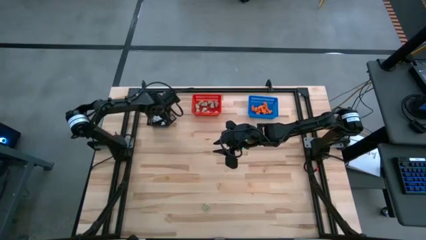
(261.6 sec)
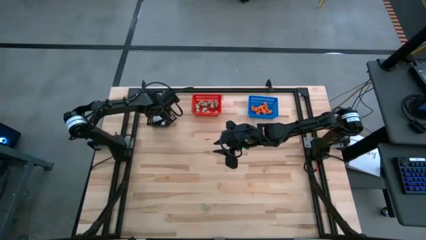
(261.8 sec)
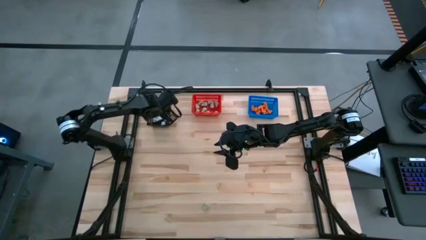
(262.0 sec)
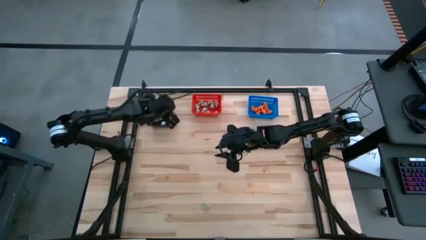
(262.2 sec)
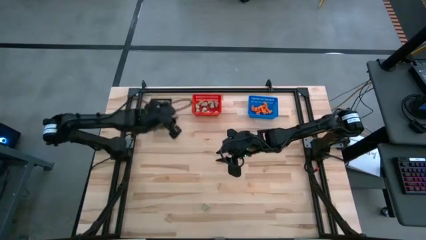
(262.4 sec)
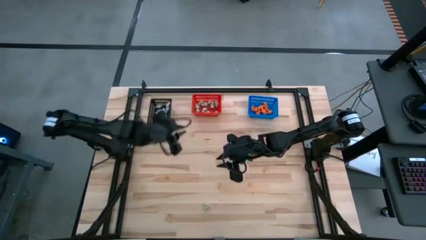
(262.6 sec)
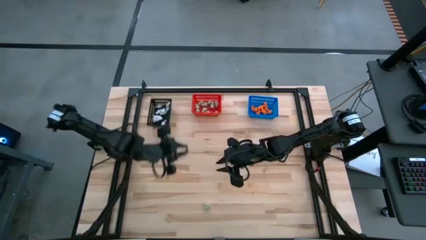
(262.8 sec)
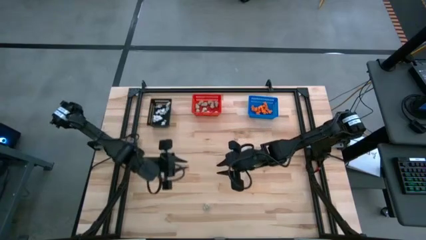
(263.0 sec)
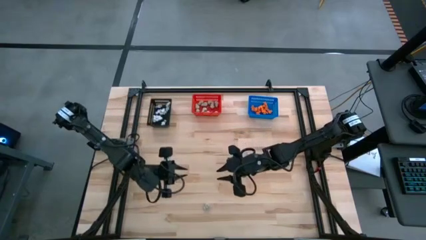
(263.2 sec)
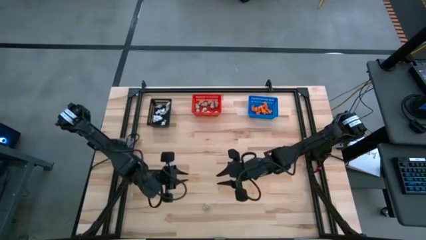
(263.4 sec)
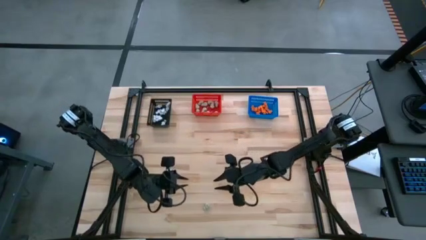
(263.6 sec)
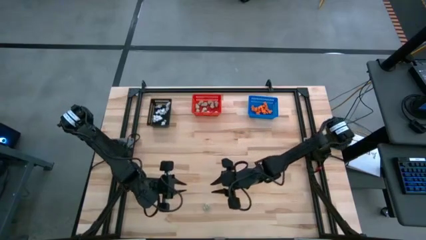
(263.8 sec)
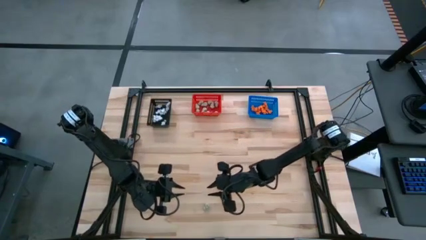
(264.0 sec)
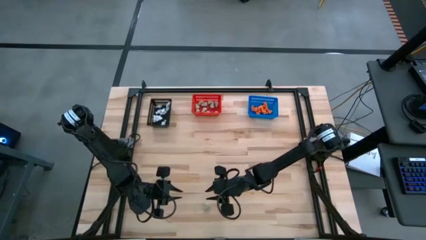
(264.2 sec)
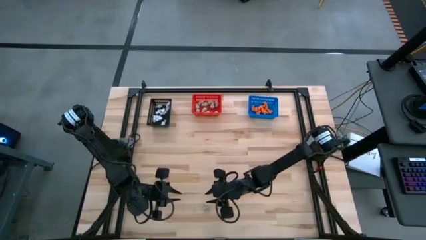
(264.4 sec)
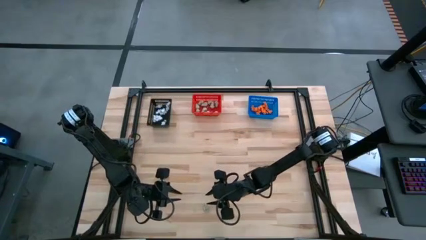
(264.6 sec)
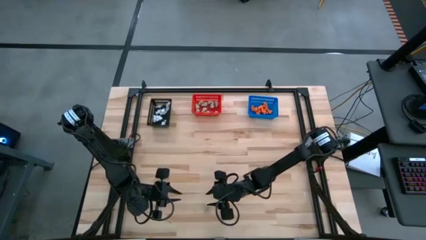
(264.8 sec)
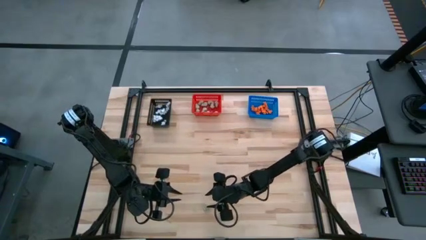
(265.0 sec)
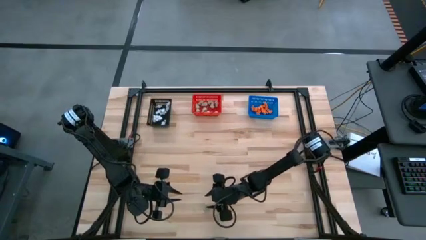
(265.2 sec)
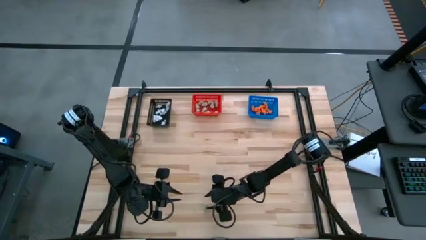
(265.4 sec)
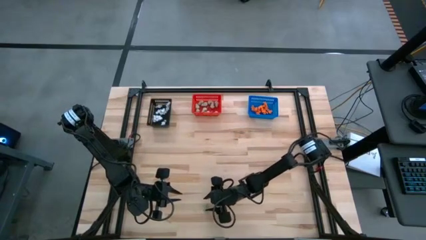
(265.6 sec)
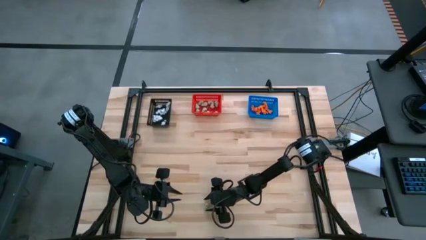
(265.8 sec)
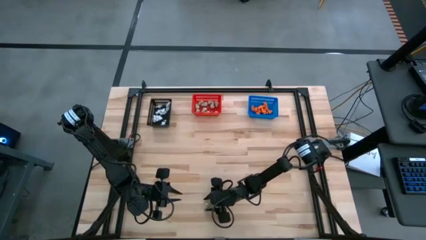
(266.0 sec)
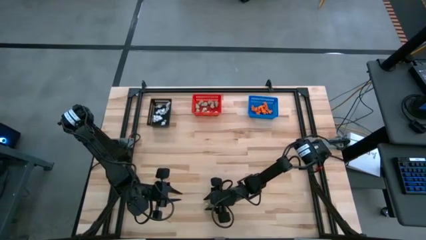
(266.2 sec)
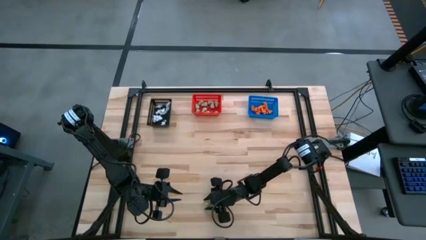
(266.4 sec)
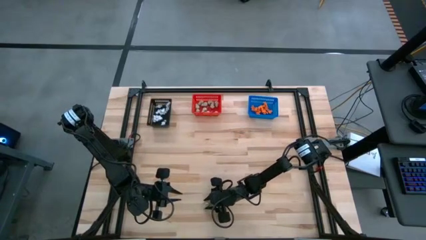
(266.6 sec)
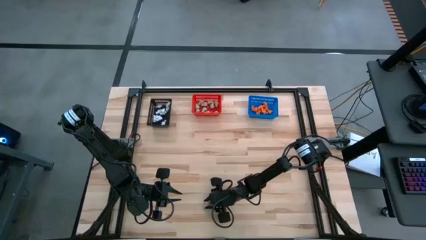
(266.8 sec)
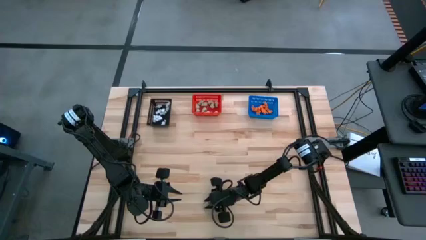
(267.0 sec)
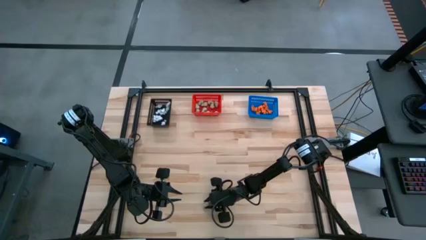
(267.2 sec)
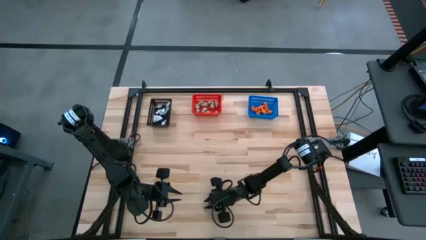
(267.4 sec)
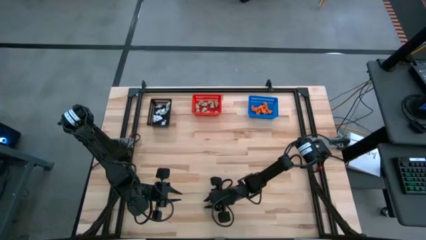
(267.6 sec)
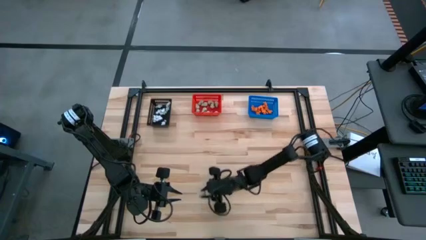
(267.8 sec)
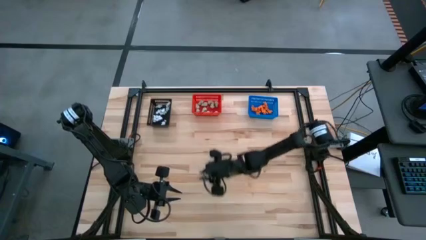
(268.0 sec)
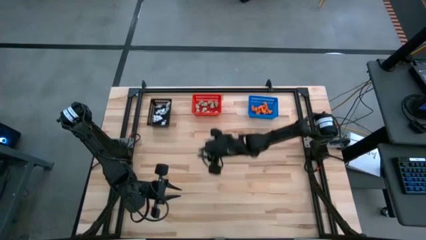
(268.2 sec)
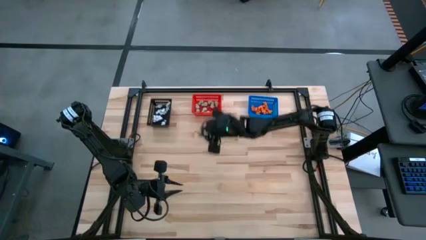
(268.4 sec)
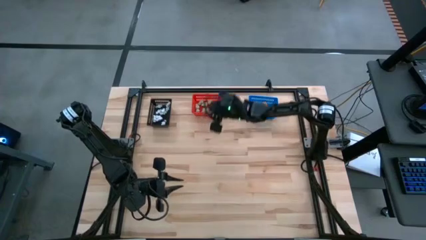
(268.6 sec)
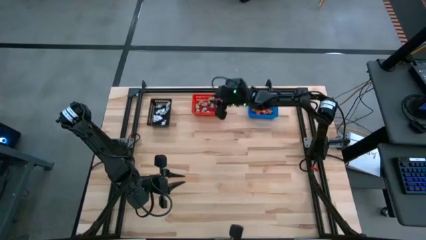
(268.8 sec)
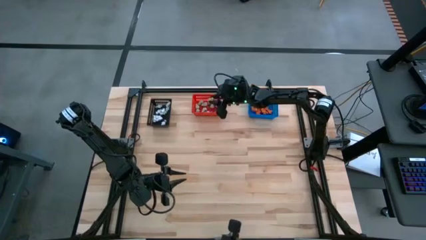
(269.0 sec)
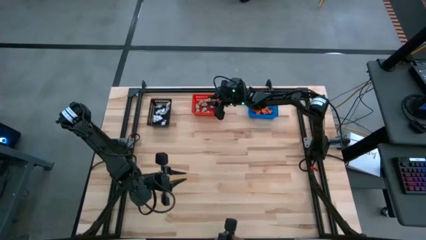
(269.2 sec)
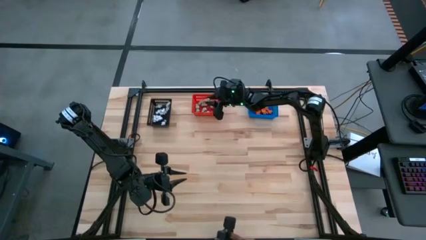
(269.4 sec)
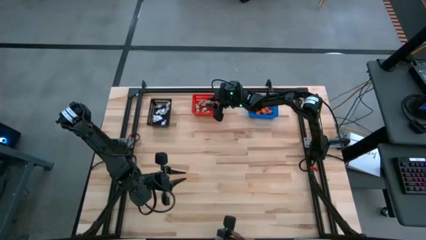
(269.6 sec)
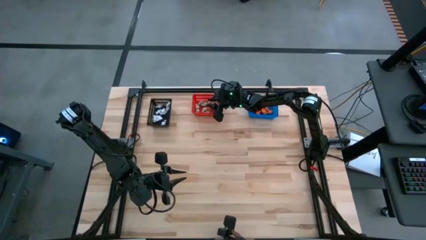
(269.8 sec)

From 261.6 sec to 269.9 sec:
Task: Sort Halloween decoration
Put the white skull toy into the red bin

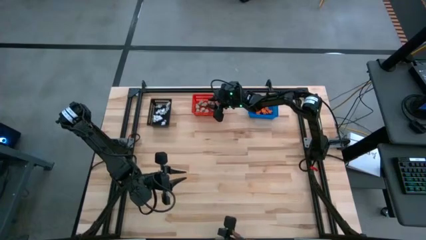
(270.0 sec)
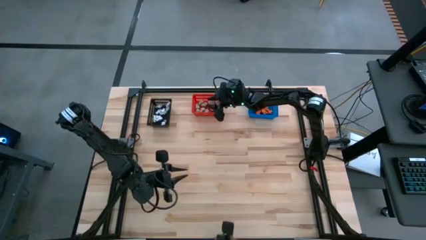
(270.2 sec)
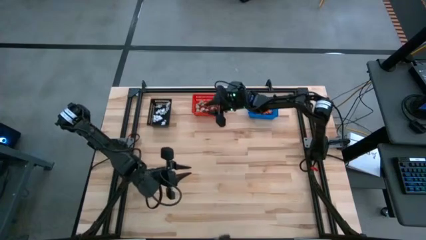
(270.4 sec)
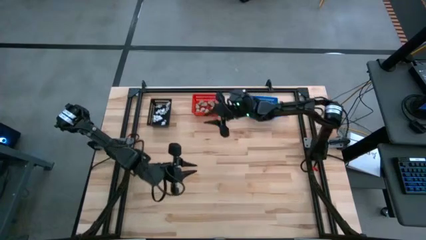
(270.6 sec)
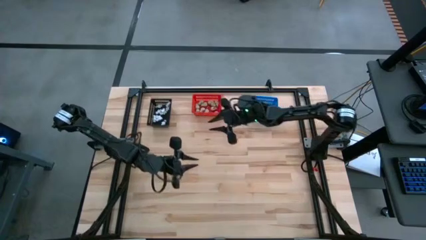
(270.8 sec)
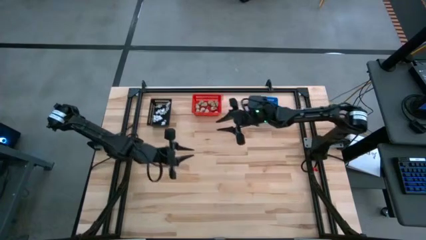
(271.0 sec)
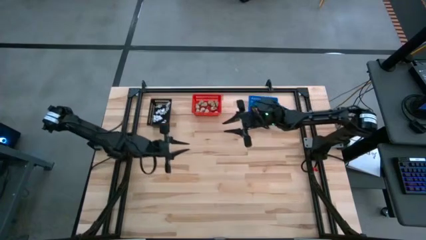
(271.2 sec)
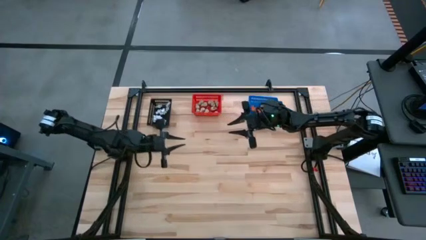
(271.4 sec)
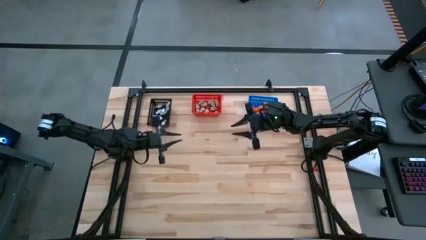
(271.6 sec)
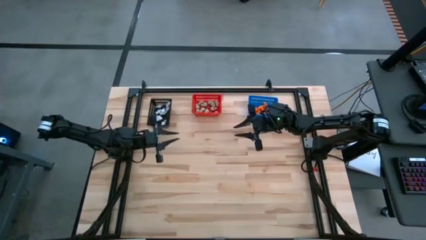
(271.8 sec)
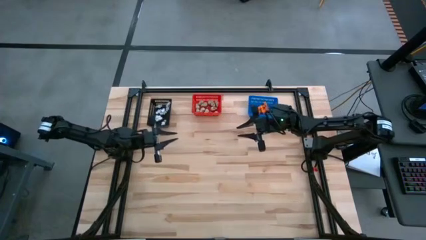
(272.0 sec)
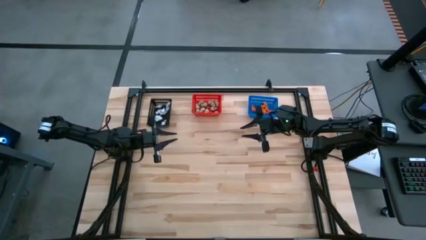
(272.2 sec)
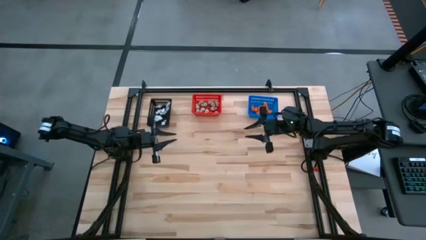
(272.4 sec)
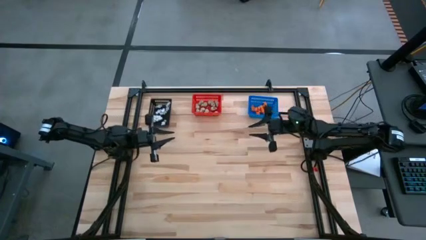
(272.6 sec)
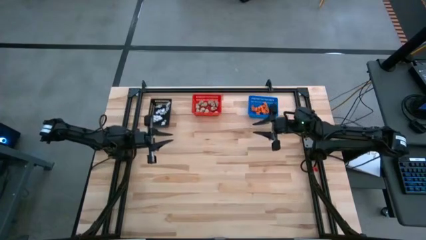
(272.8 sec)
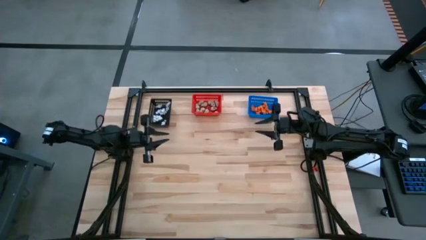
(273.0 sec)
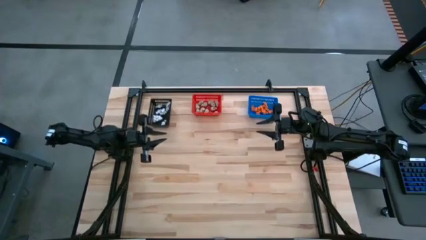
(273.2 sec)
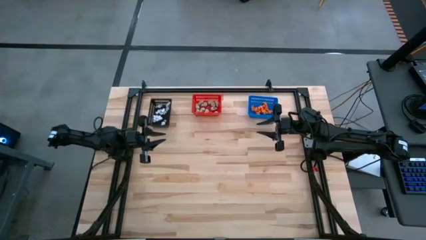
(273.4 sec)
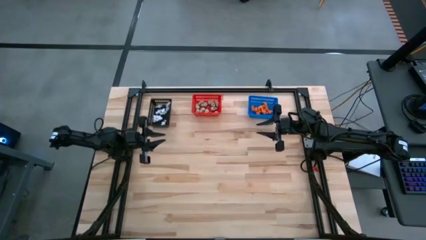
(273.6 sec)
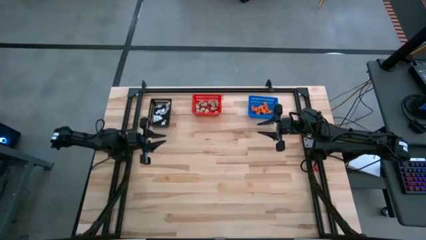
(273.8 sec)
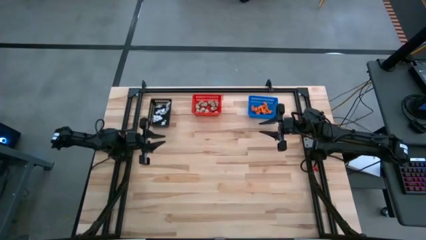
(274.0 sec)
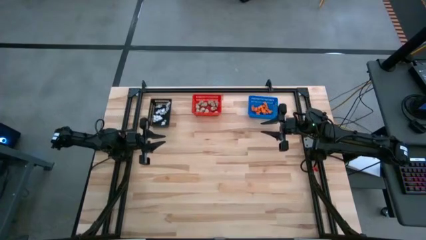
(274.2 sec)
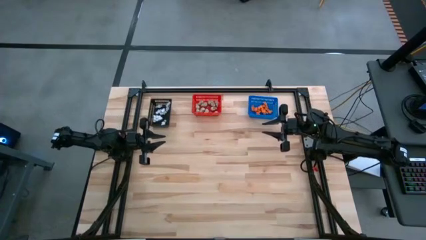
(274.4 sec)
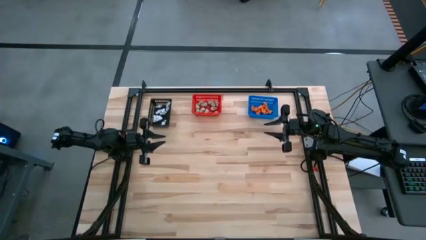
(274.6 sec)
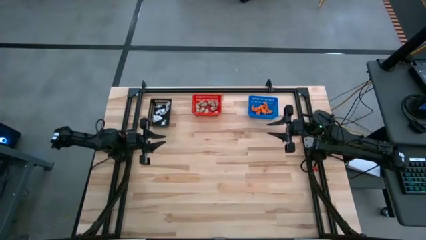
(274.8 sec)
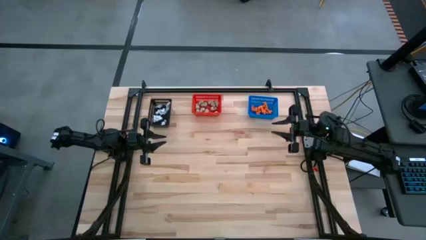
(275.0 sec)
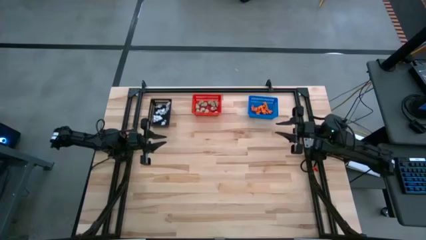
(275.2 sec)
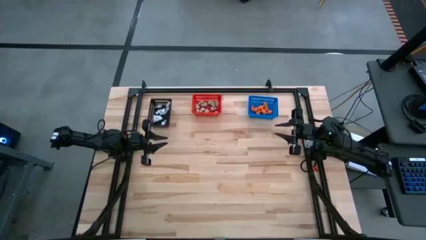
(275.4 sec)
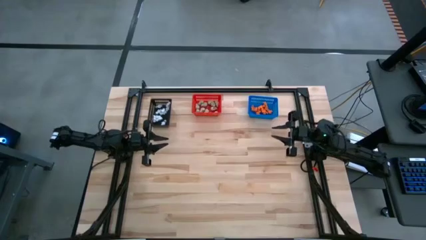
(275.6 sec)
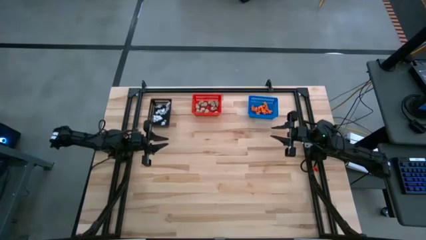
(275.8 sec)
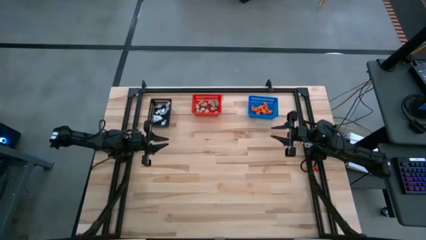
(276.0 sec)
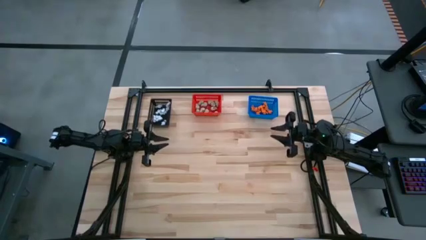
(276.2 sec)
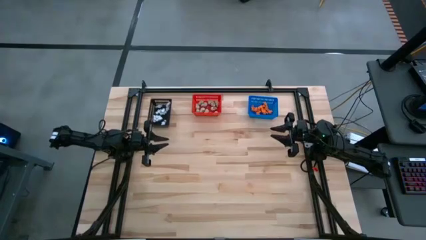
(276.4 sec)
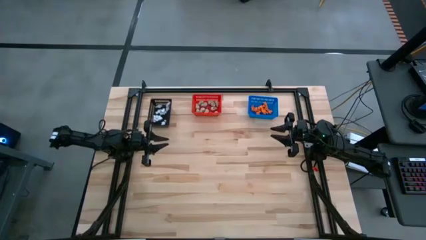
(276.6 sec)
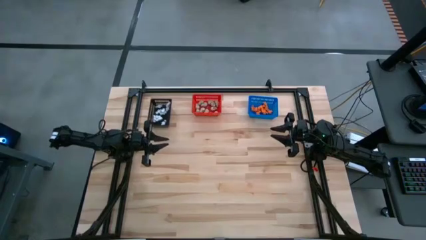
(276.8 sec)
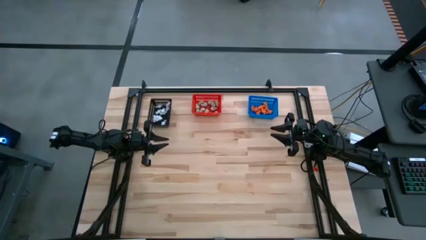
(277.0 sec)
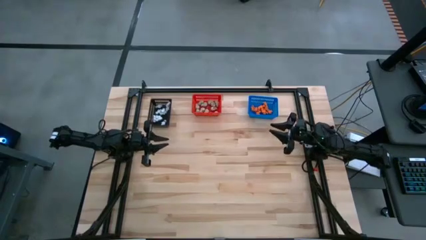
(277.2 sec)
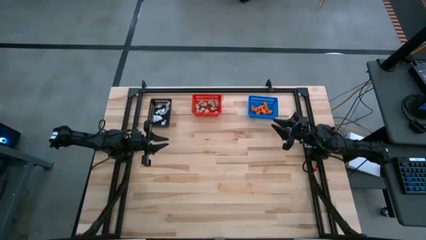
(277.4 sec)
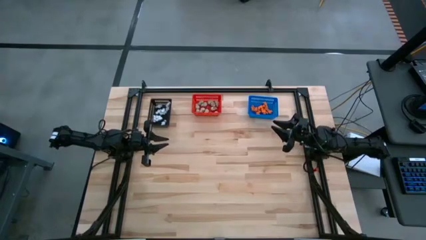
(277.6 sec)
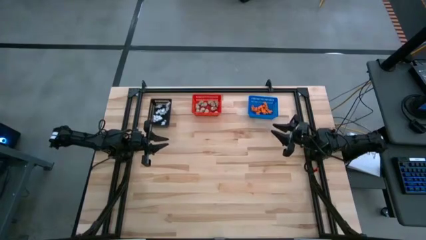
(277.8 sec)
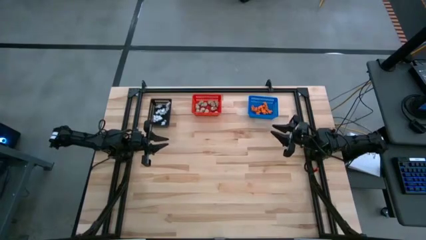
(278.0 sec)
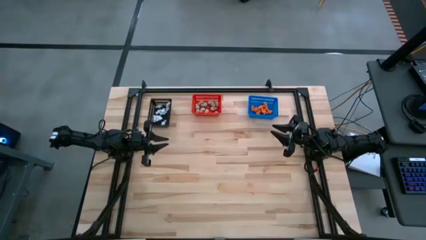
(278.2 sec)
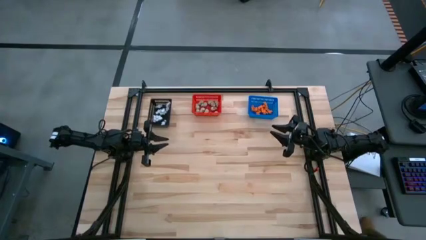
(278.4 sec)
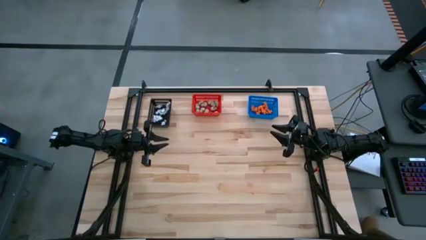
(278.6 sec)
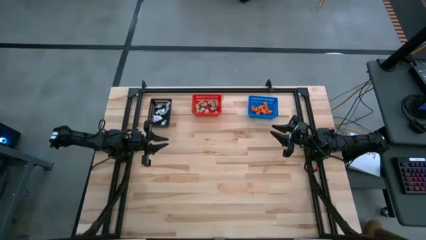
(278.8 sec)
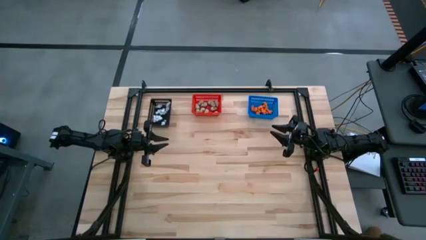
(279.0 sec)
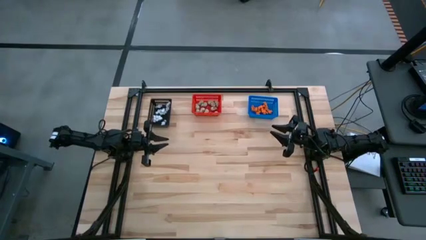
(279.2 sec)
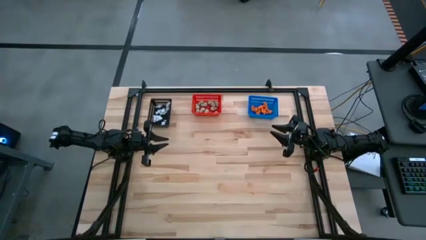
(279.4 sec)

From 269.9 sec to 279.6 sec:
Return to Home Position
